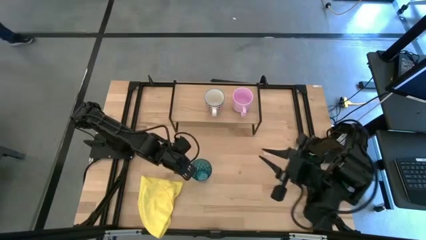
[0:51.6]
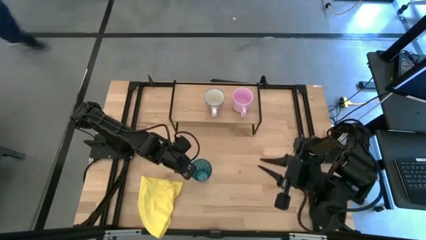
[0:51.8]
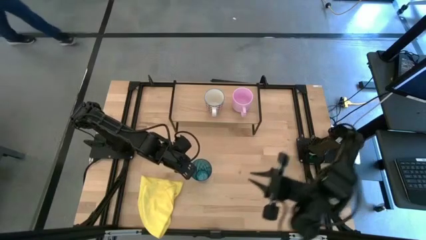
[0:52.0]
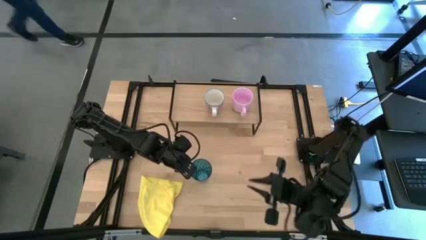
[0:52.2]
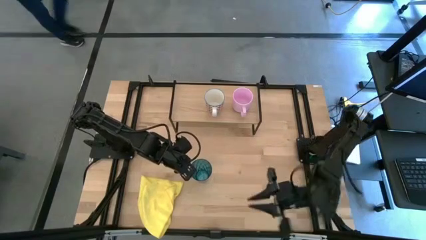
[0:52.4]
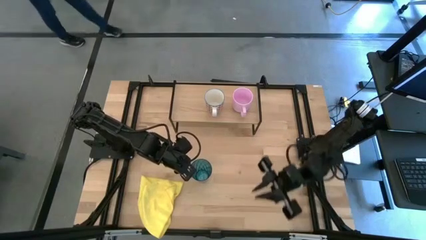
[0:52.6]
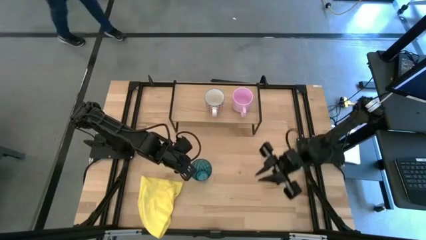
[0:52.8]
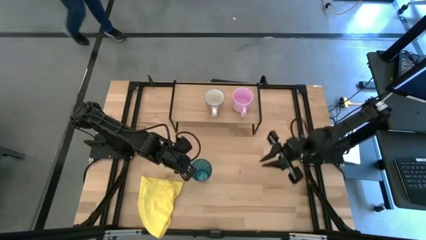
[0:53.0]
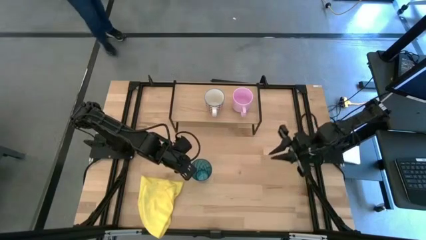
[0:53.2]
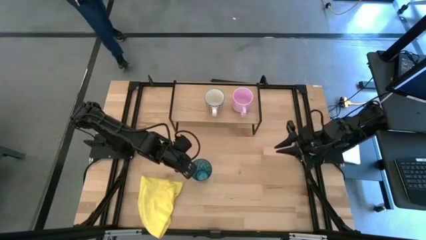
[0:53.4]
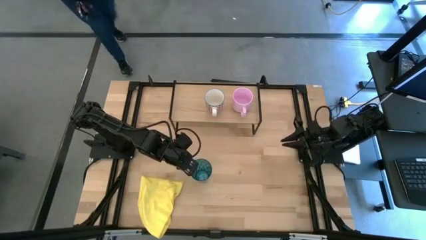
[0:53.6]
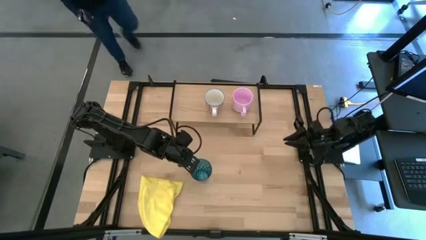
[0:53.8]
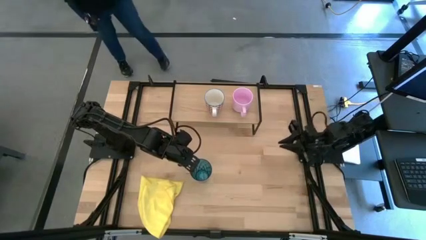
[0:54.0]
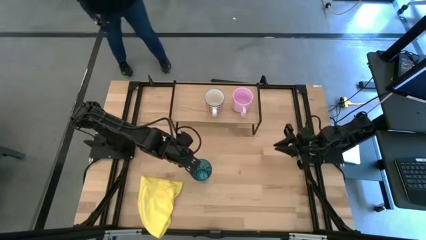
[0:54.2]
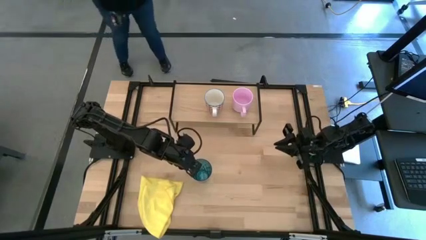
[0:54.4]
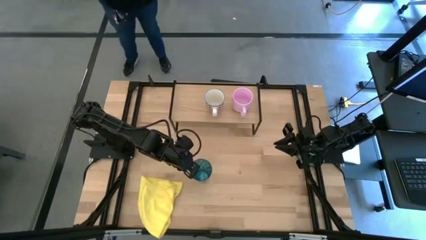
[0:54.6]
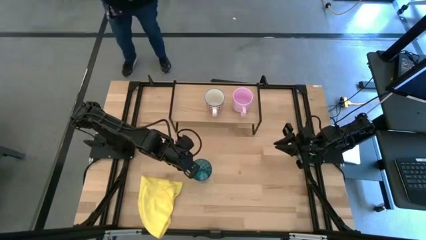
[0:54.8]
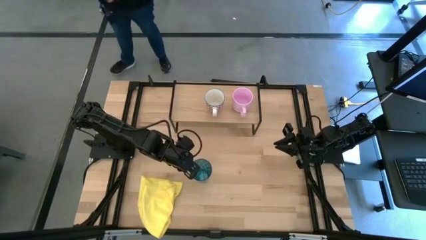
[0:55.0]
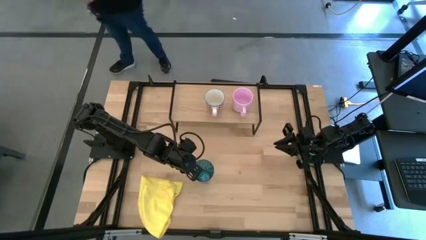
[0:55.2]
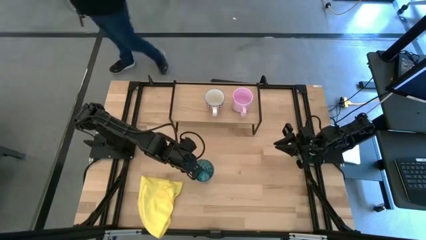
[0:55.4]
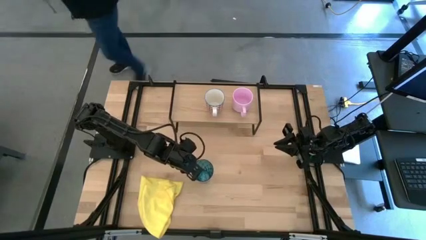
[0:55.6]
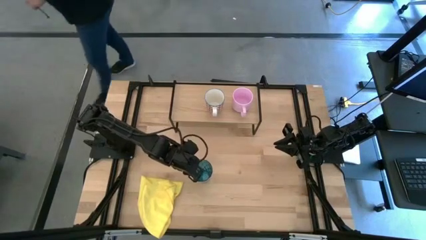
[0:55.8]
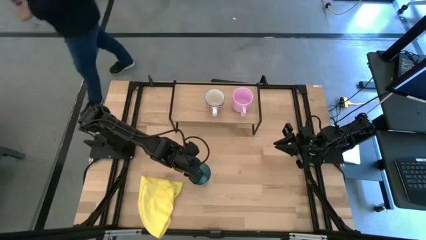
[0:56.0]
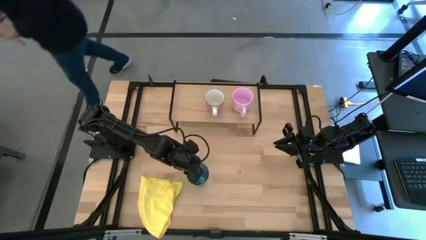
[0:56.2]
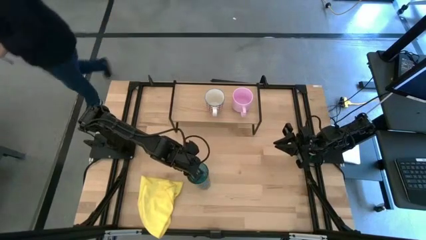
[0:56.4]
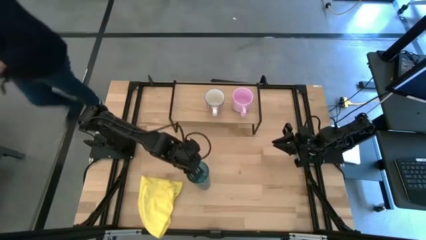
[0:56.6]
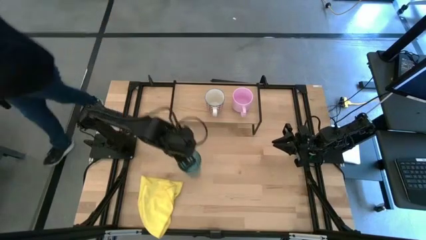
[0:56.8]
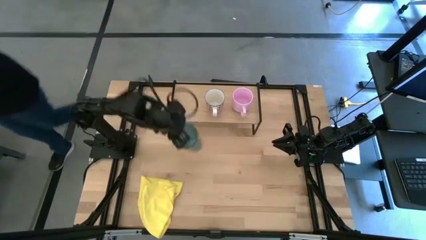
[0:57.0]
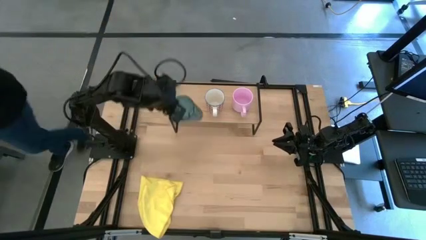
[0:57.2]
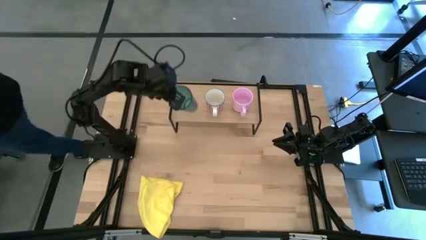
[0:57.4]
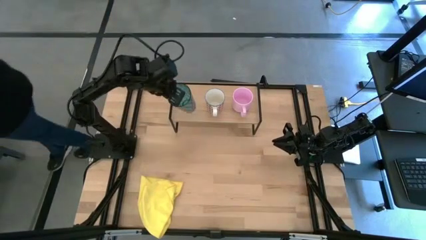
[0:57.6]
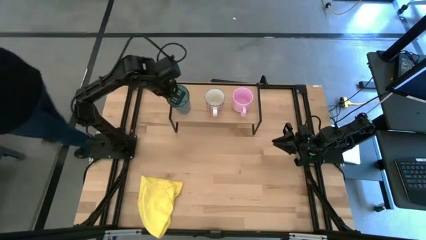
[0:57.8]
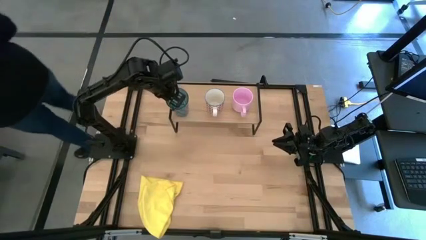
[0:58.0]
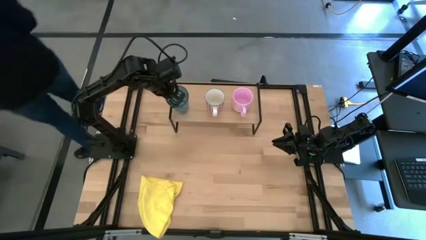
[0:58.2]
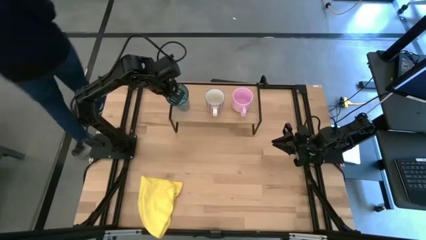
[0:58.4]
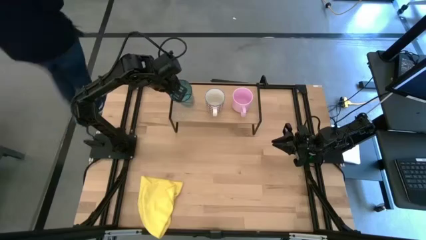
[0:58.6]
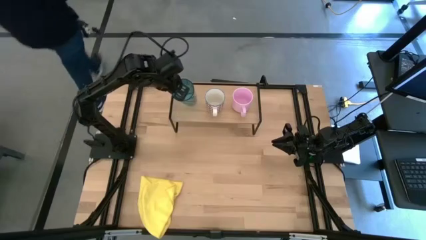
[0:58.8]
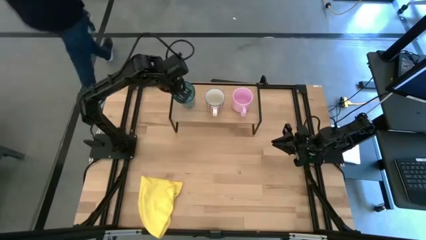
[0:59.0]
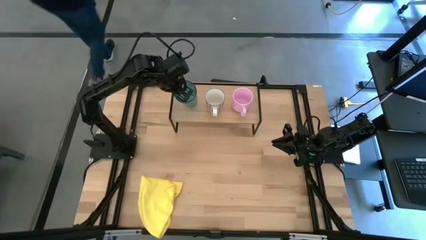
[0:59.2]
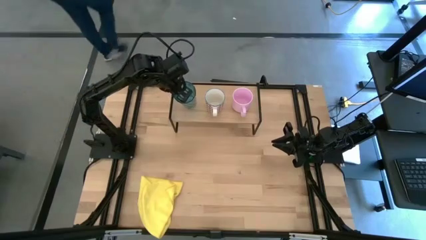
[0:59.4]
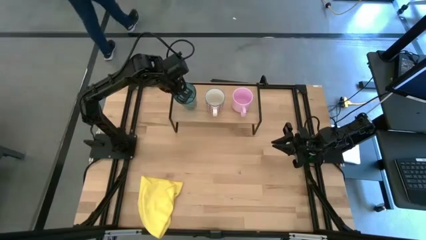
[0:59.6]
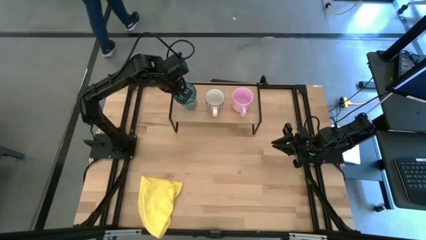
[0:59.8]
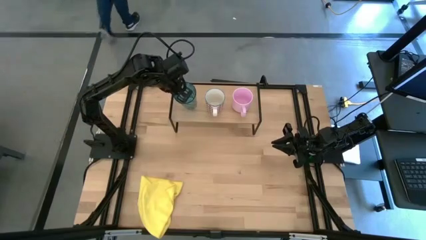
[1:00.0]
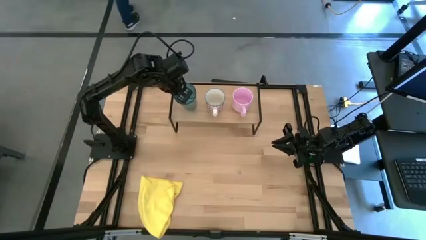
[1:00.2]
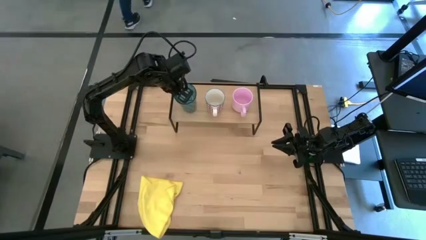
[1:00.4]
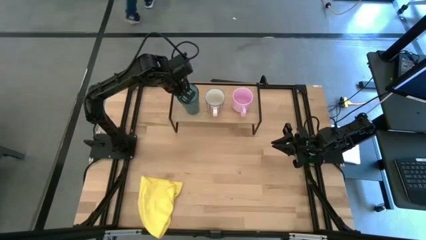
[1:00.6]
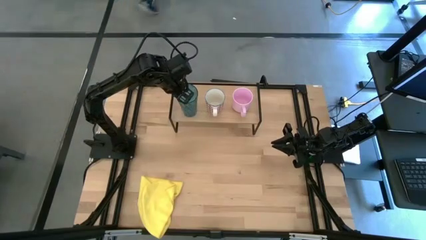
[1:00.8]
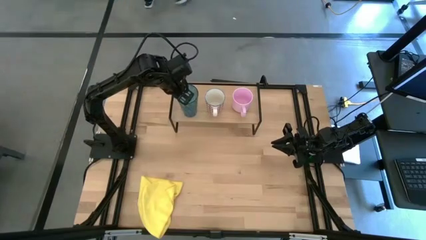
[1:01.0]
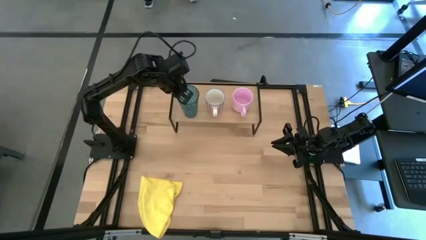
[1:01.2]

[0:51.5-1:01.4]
Task: Stack small to large cups/mugs on shelf
Put the blue cup on the shelf

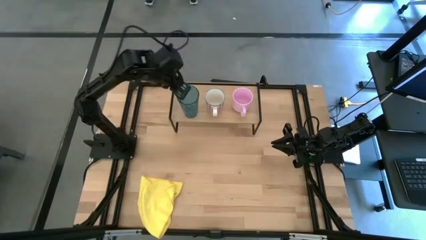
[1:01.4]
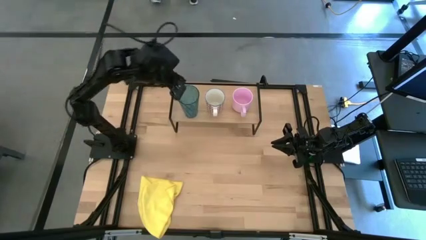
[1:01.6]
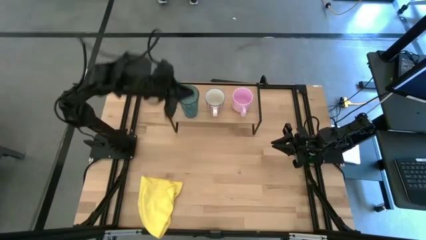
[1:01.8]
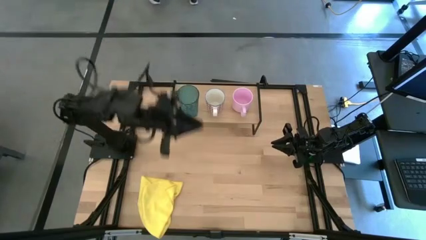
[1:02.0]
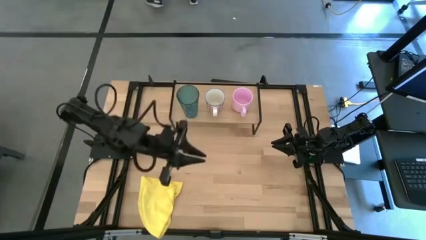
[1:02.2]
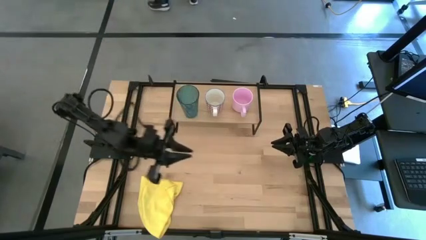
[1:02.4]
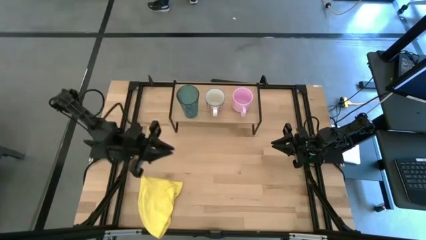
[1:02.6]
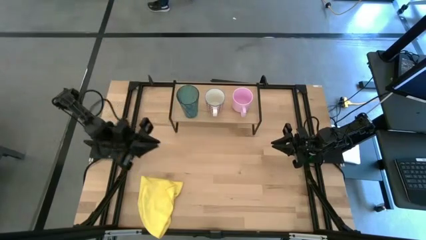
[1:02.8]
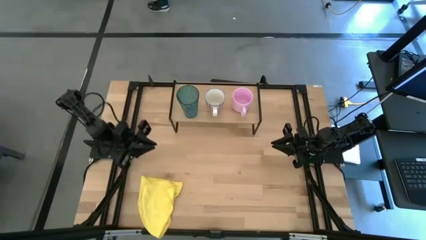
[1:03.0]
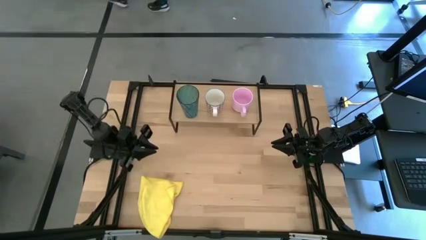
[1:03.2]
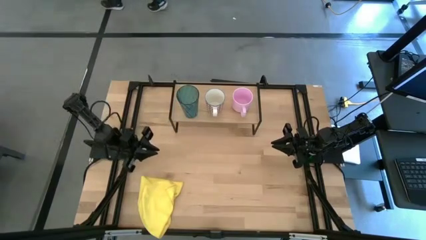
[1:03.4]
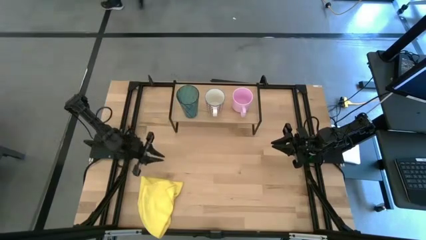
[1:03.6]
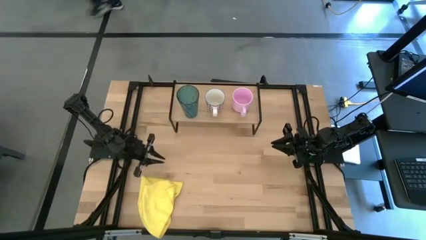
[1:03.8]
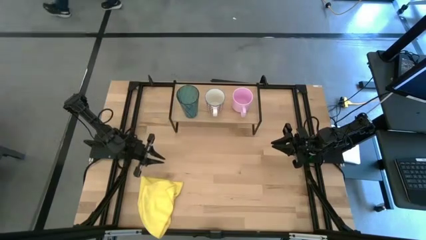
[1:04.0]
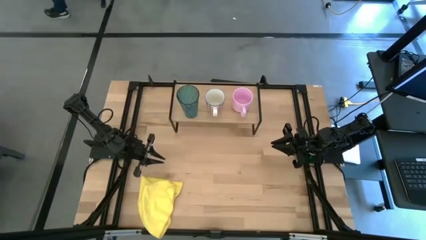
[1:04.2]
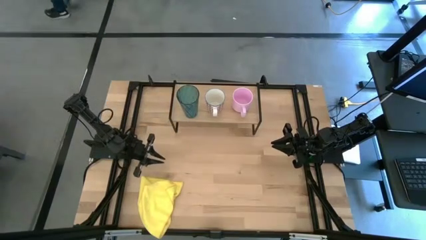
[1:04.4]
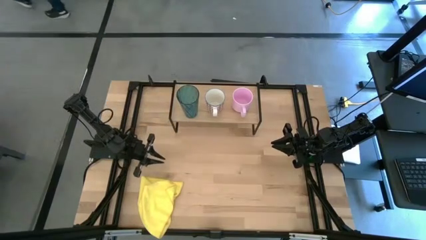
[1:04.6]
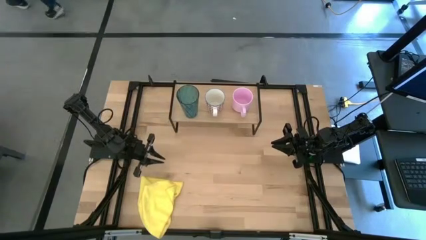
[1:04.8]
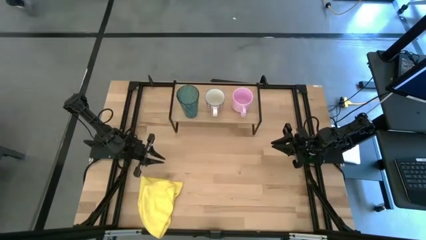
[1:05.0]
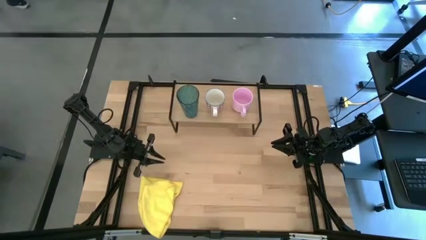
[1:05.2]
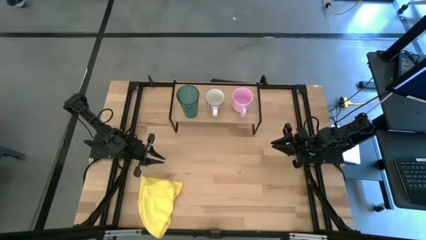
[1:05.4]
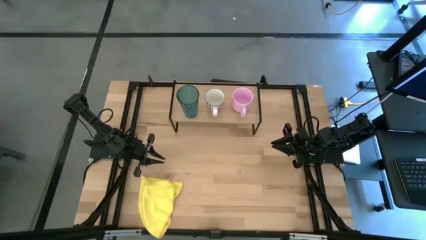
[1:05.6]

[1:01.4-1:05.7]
Return to Home Position
